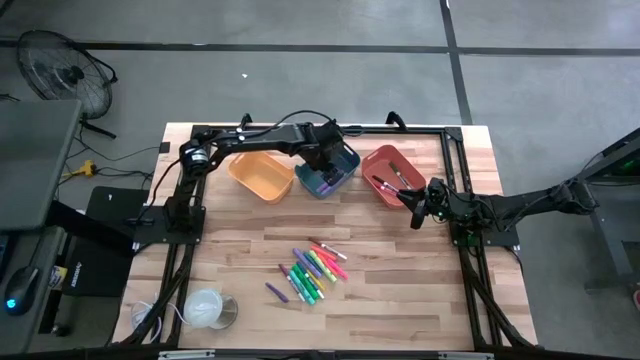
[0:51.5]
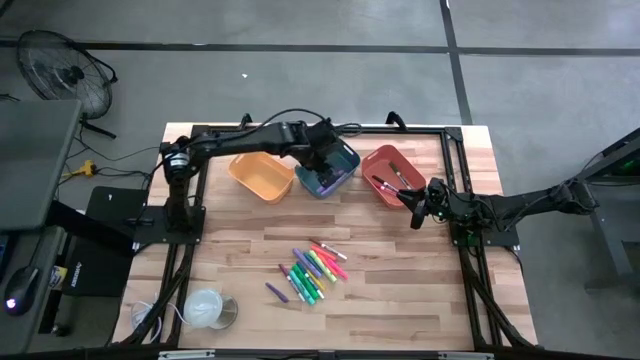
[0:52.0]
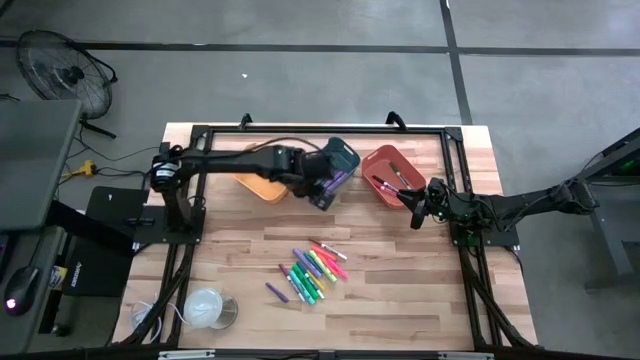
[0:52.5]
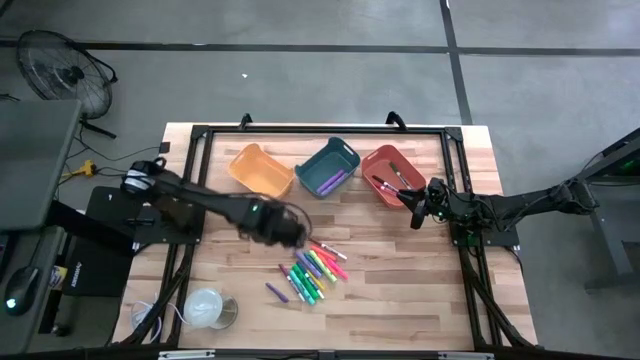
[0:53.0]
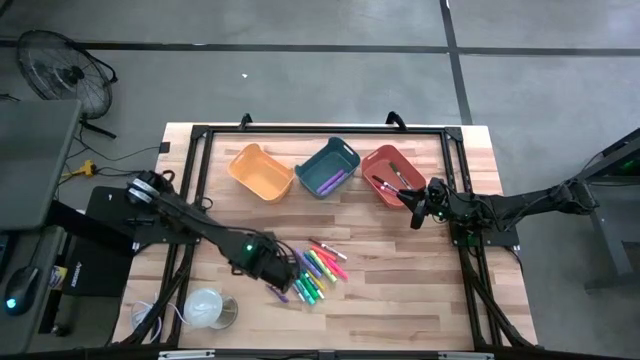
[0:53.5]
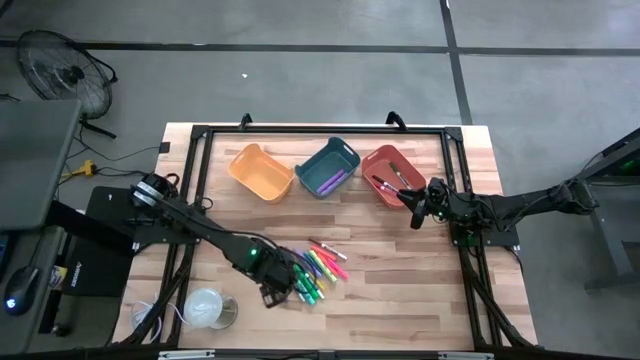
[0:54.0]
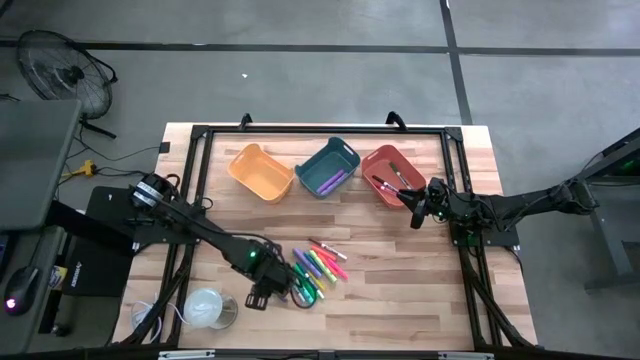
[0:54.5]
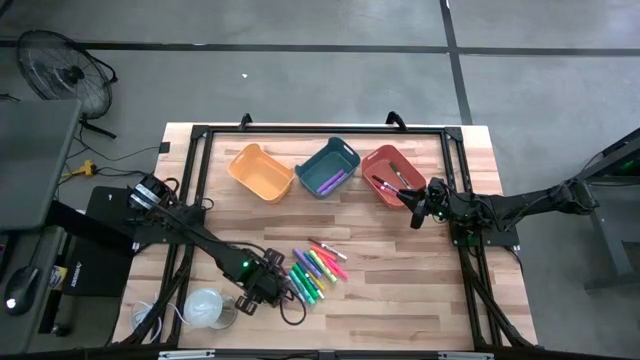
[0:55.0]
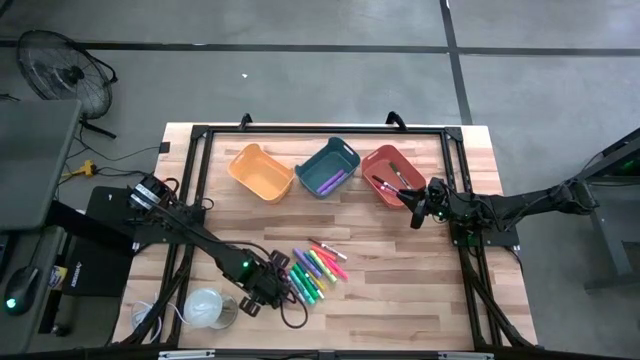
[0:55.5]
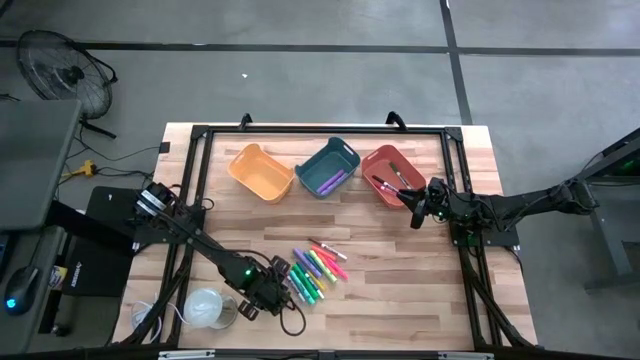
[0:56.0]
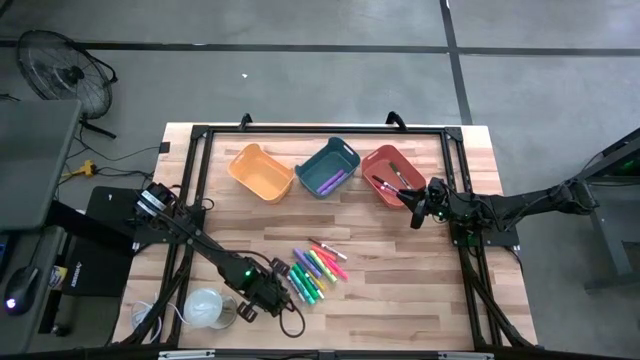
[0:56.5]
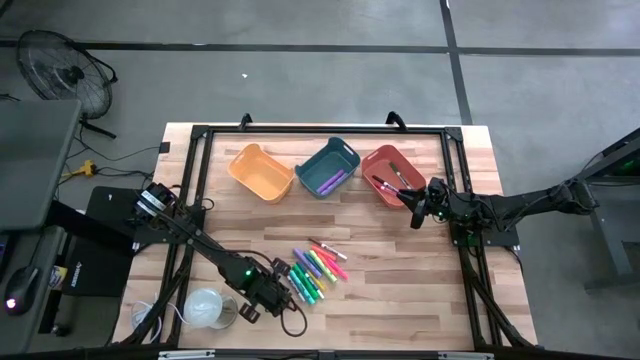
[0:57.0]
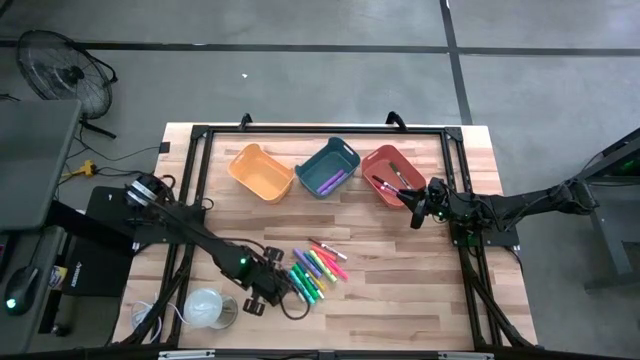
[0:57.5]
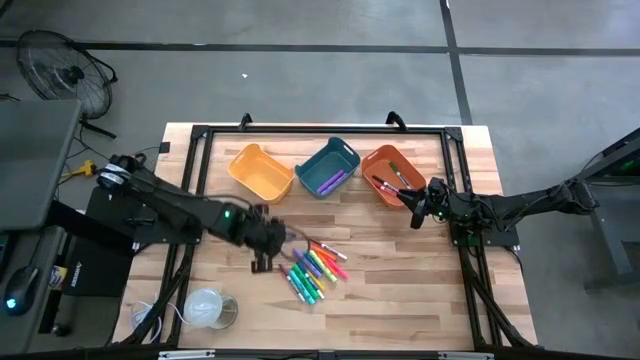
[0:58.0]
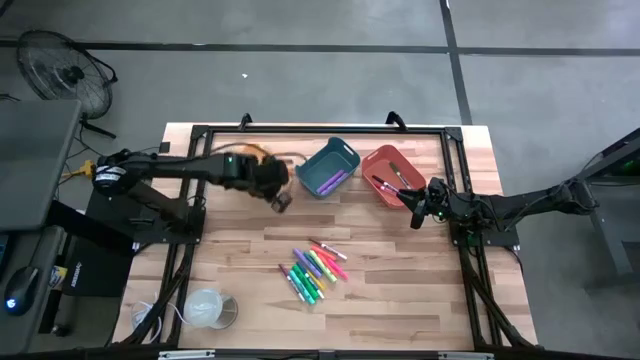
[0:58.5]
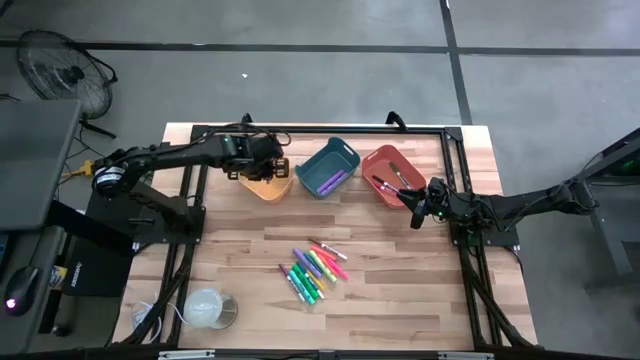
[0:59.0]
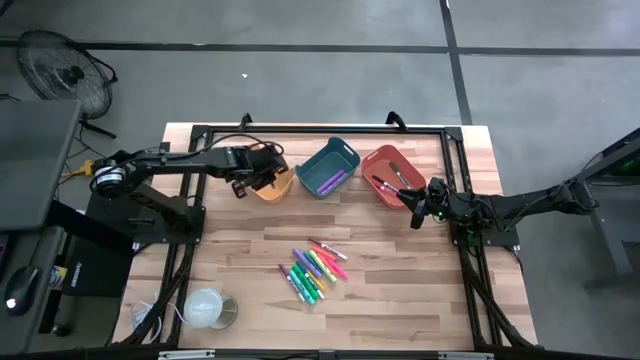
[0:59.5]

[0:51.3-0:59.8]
Task: Pick & Place Markers
Put the purple pen into the yellow bin

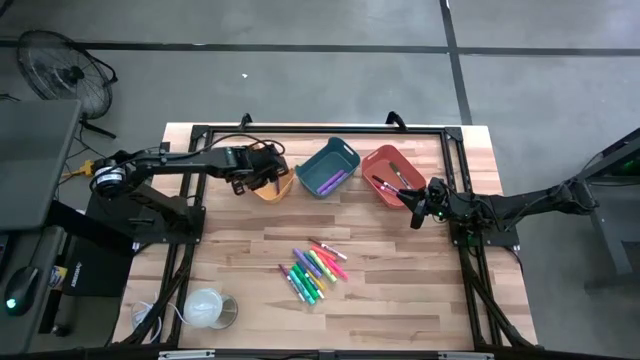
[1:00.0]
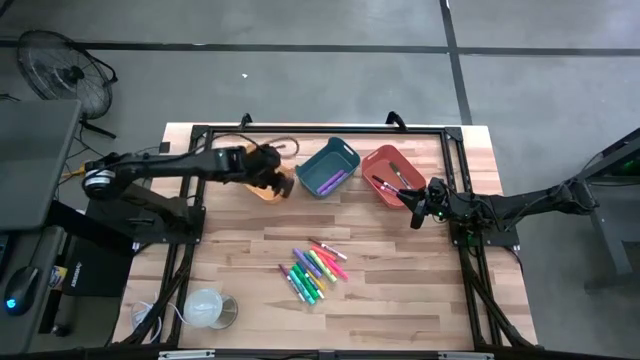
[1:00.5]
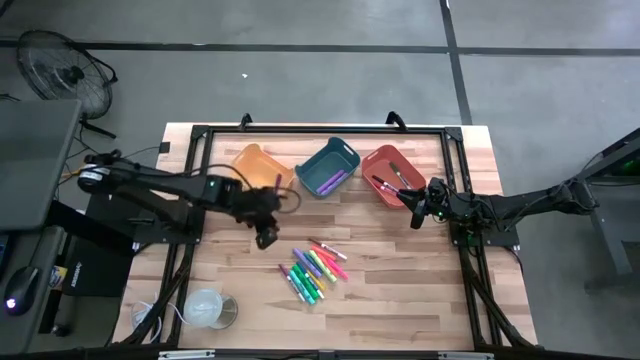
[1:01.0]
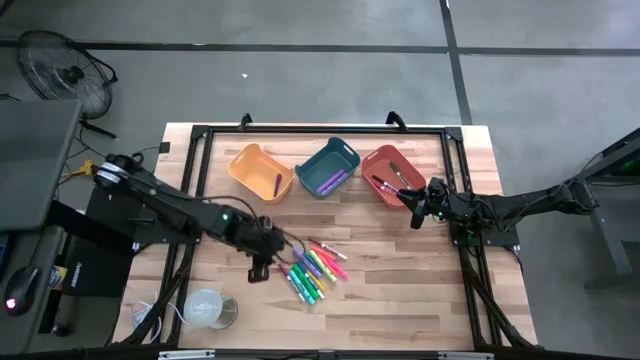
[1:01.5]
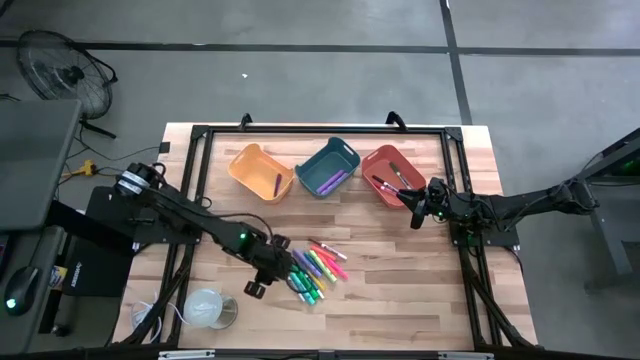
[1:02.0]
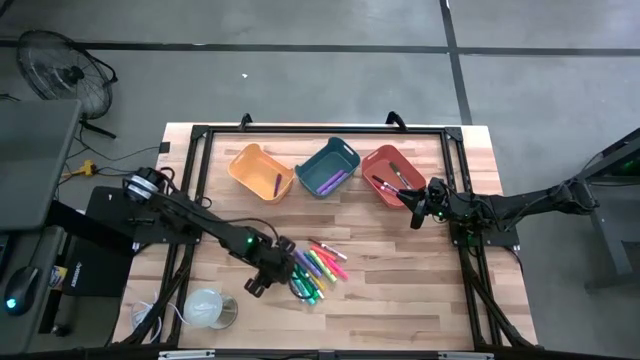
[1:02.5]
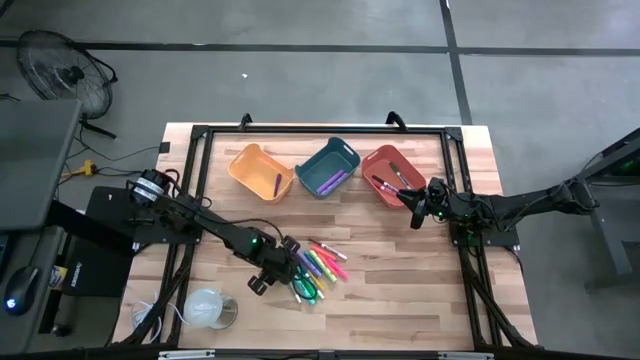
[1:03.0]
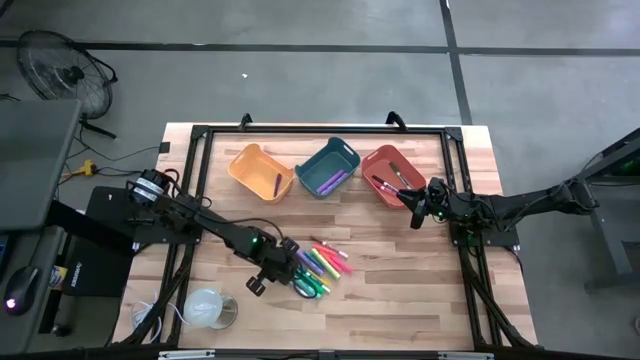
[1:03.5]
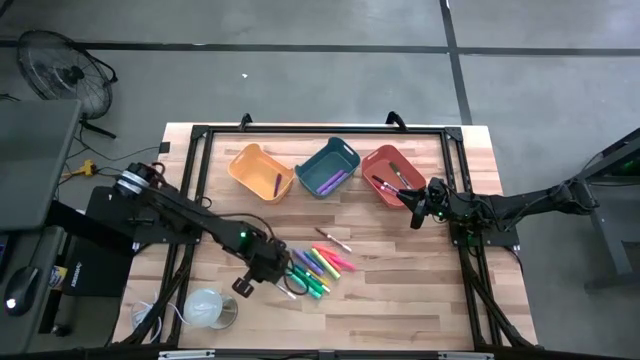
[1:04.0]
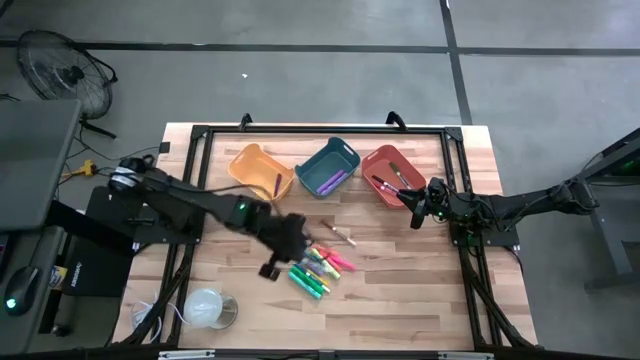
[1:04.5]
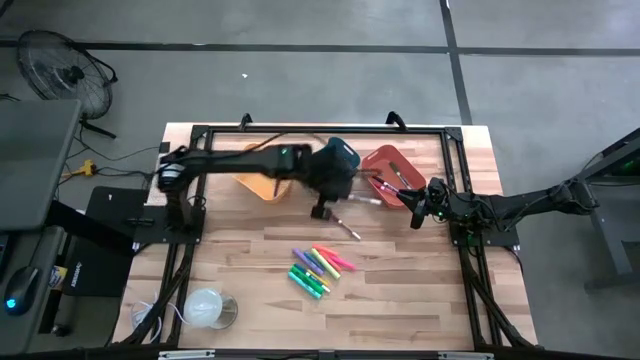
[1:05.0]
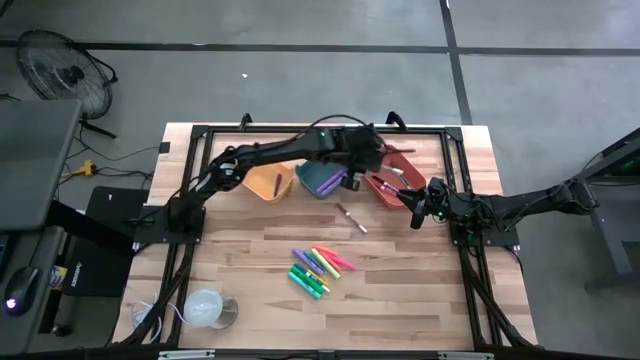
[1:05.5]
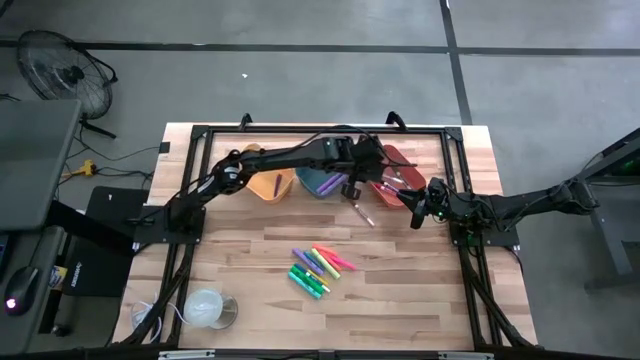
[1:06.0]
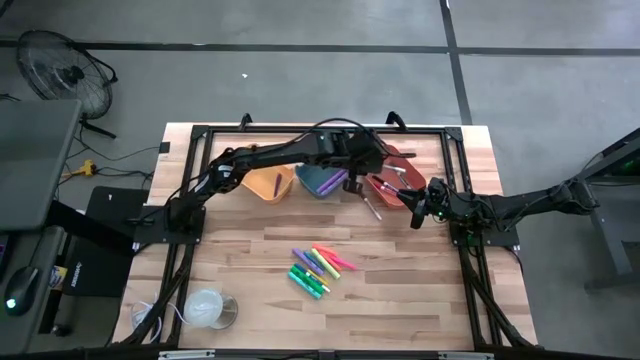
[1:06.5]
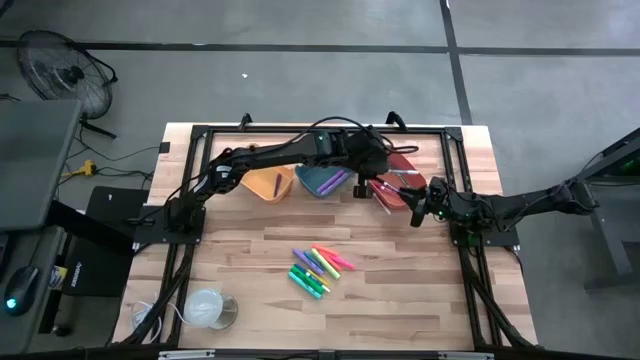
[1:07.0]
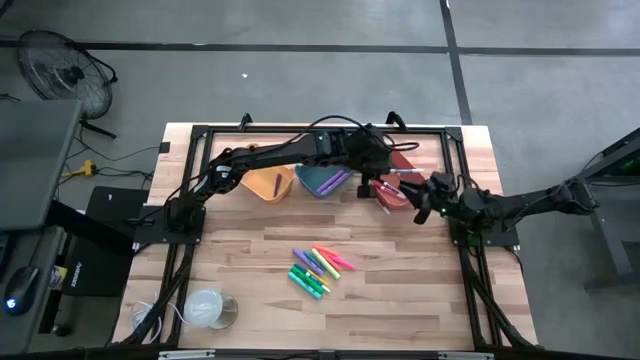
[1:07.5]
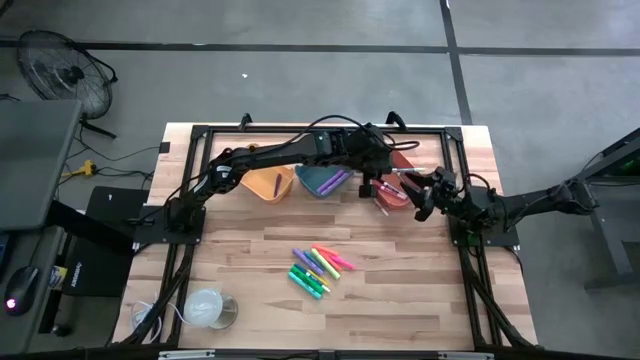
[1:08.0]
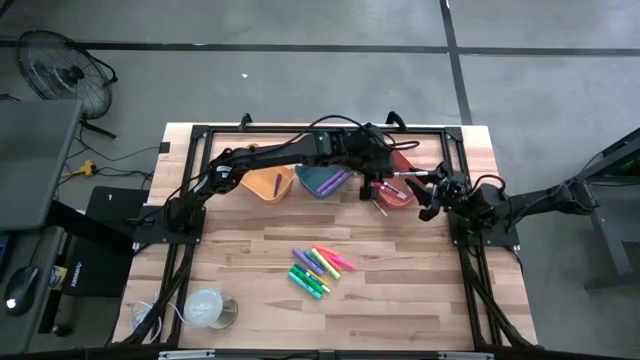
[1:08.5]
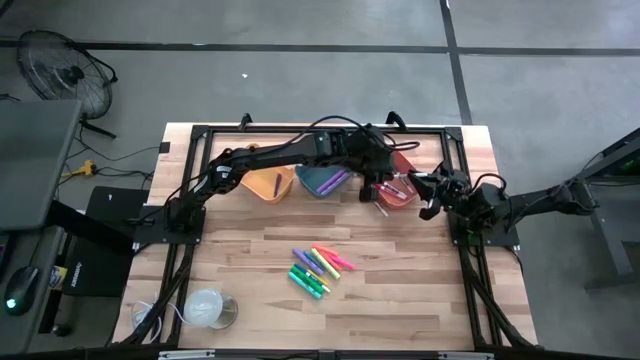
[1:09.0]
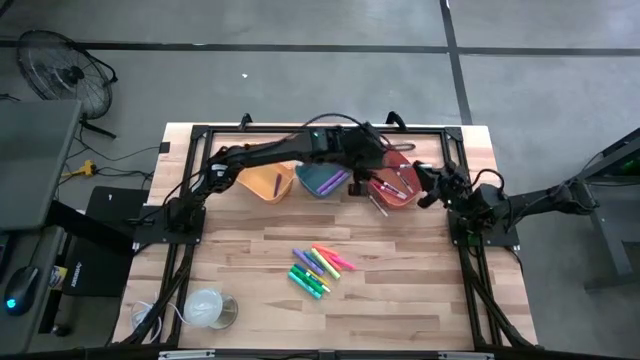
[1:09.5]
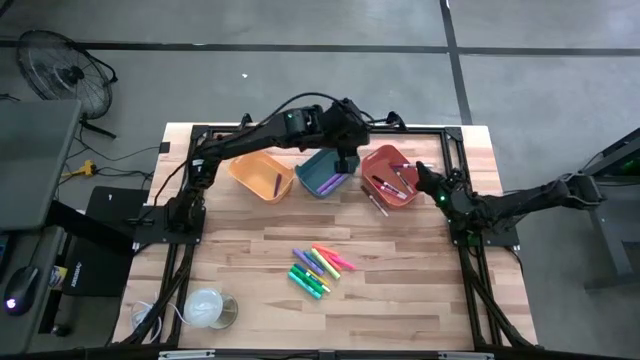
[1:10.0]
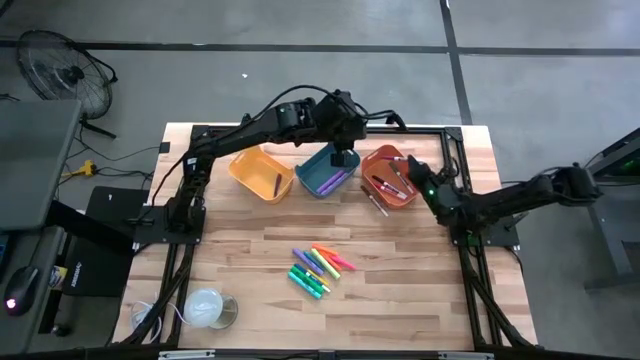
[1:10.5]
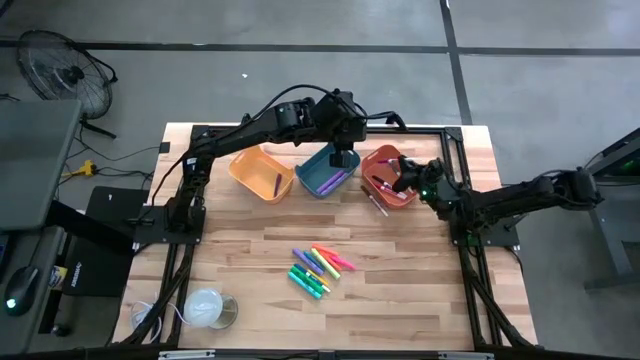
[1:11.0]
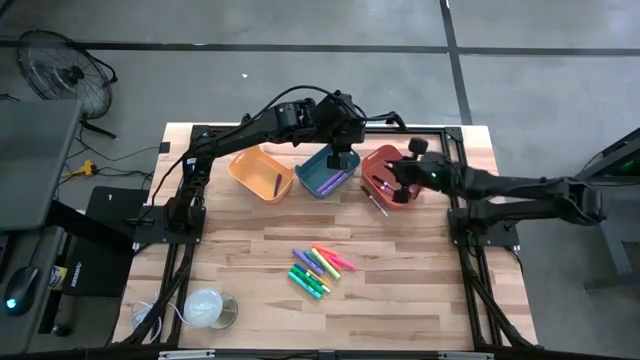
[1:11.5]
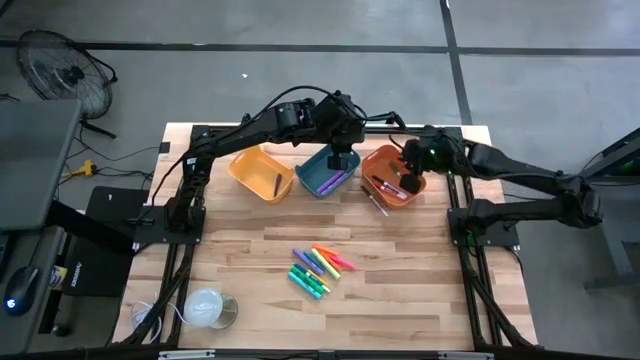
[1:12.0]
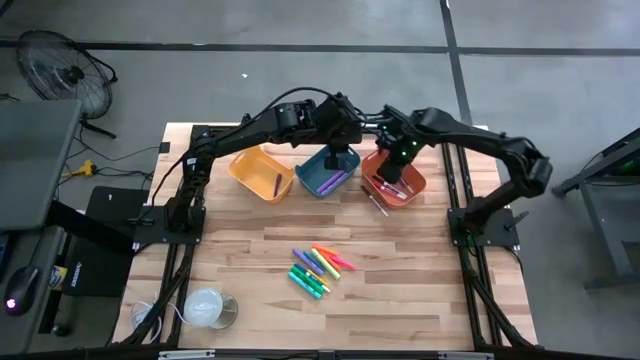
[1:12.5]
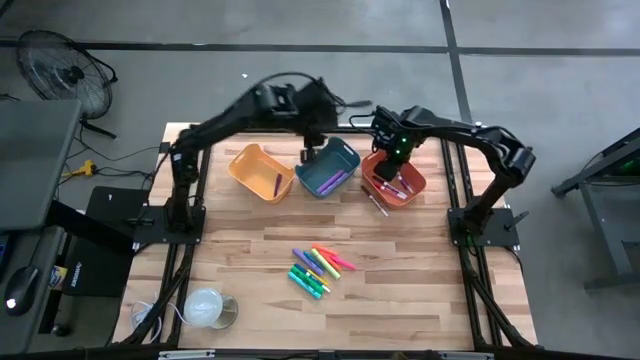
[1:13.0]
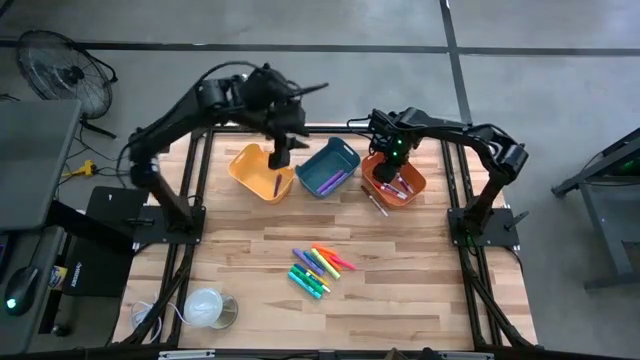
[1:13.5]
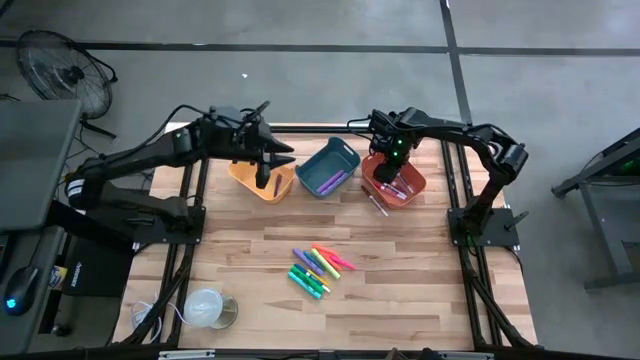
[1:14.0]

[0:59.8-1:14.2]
Put the purple marker pen into the orange bin
